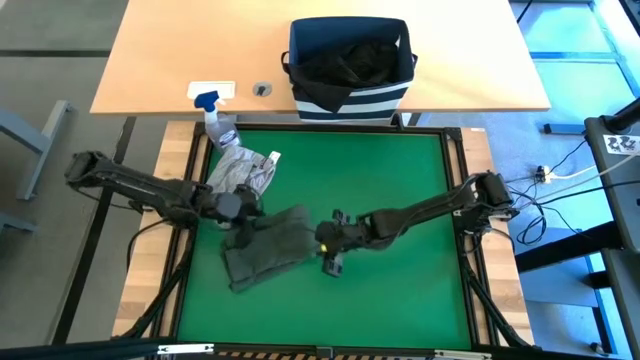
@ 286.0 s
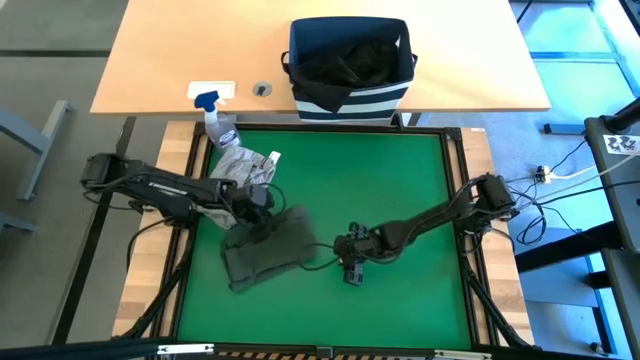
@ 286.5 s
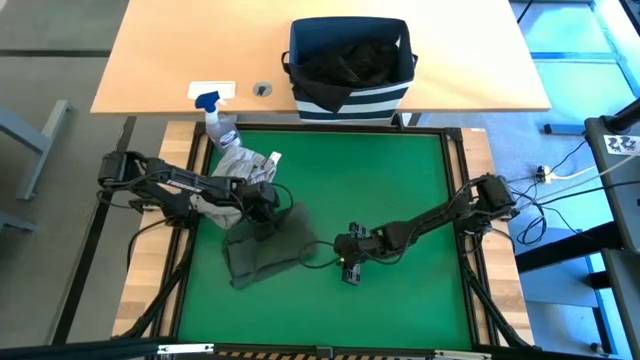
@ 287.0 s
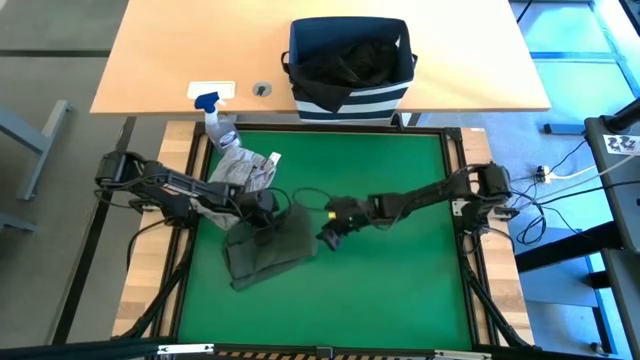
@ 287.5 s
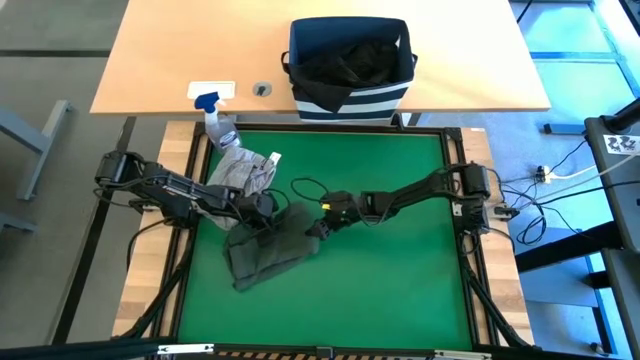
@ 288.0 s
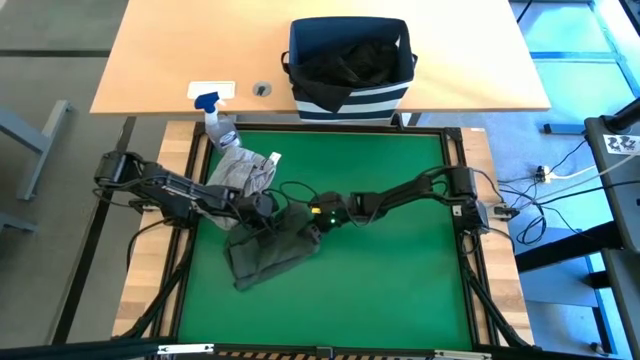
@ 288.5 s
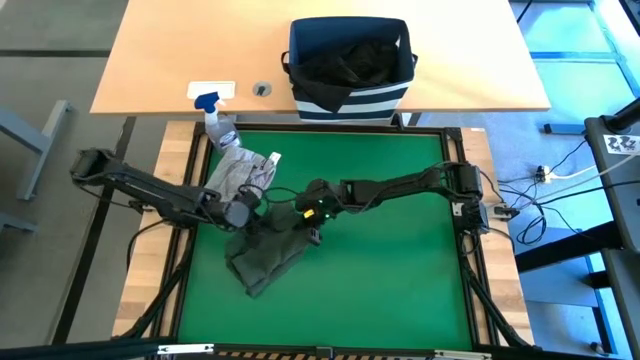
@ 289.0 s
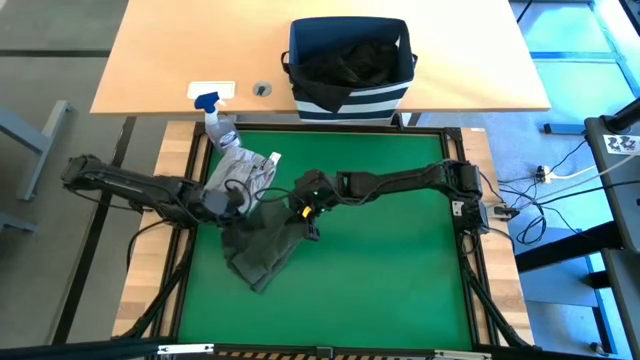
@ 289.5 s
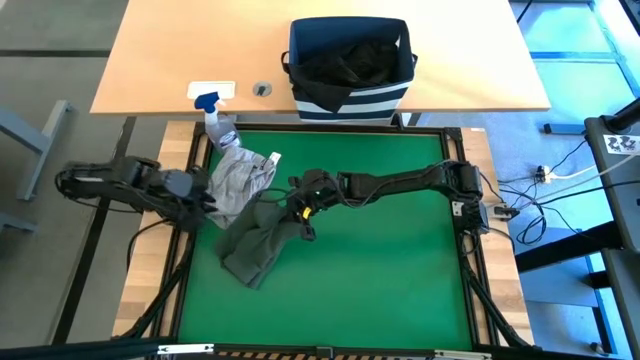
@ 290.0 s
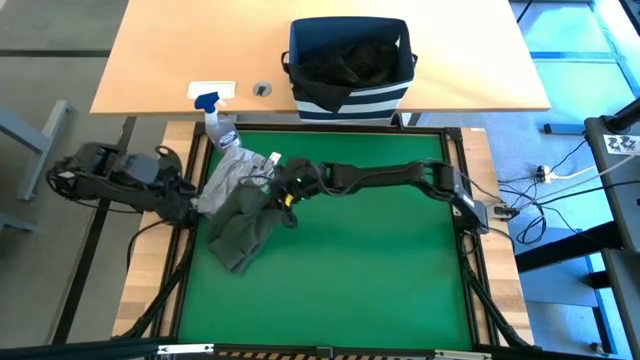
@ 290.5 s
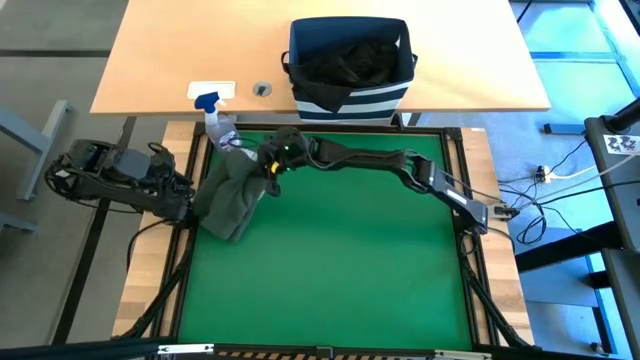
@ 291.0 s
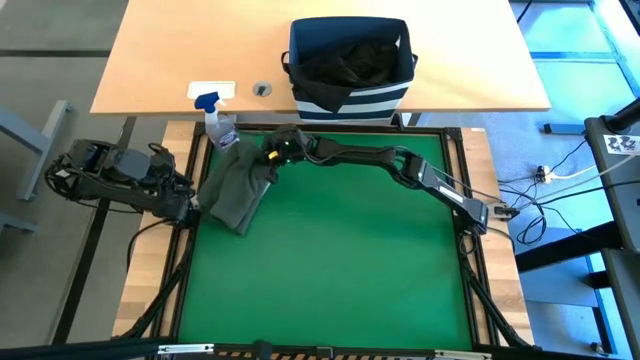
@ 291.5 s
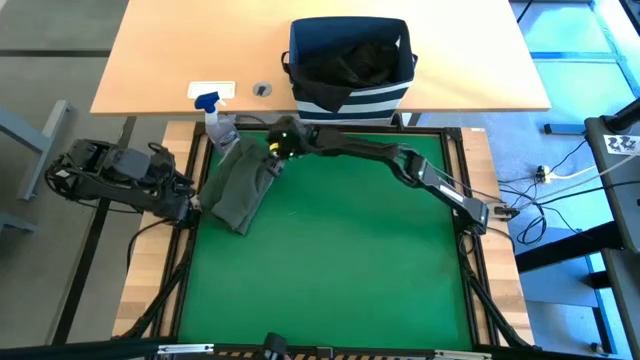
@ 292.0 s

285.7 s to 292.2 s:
Task: Fold Laundry from Bin
Stack the green shirt on top of the gray shirt on the table

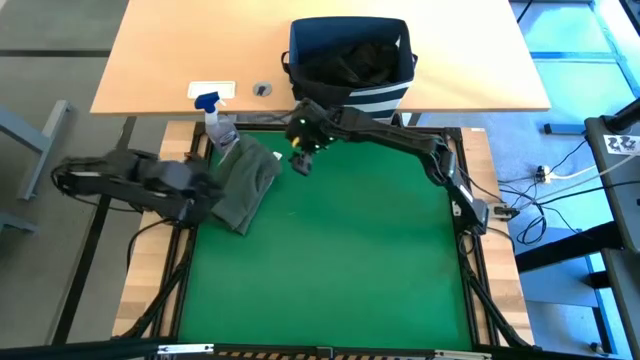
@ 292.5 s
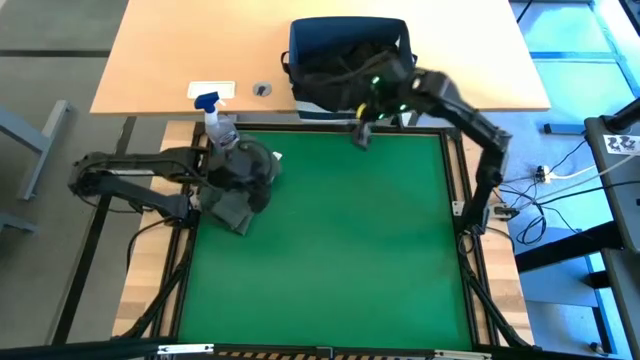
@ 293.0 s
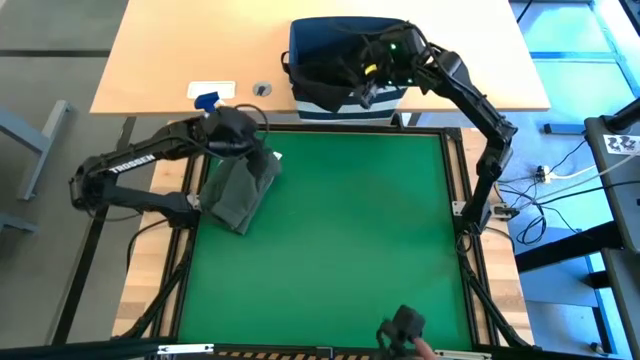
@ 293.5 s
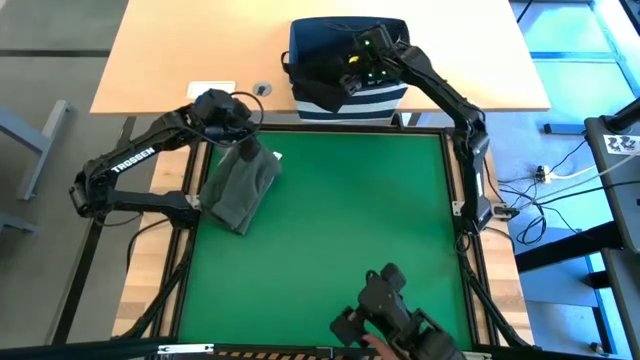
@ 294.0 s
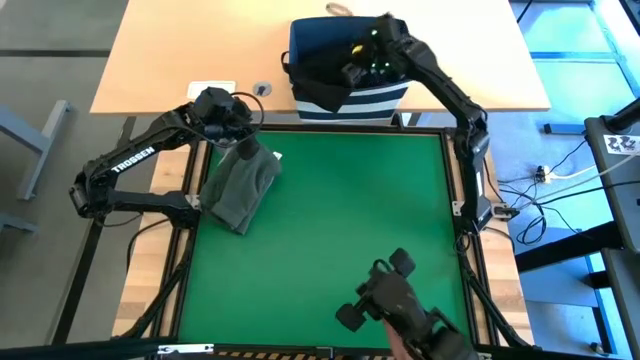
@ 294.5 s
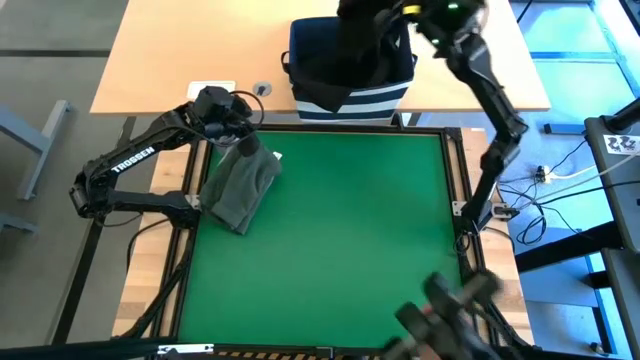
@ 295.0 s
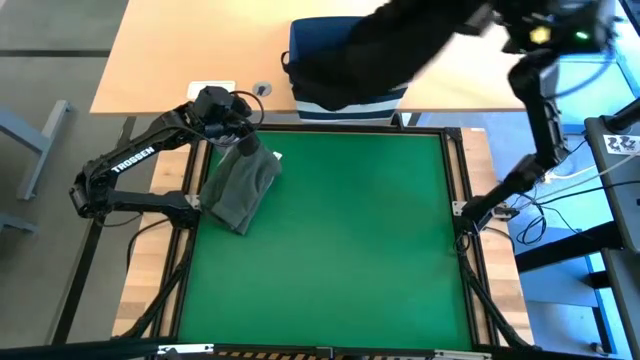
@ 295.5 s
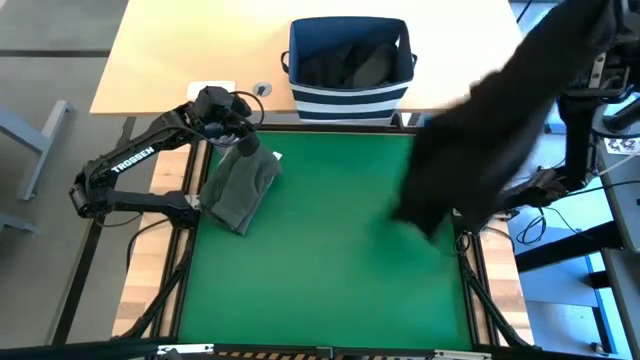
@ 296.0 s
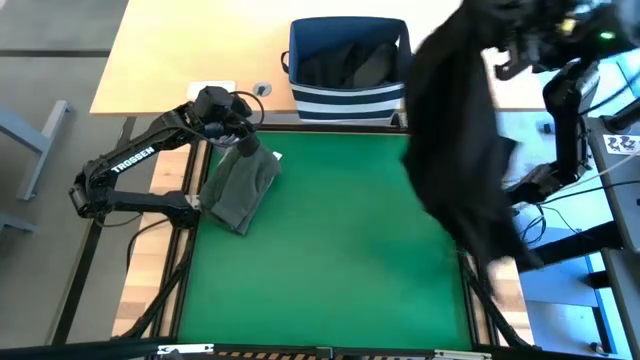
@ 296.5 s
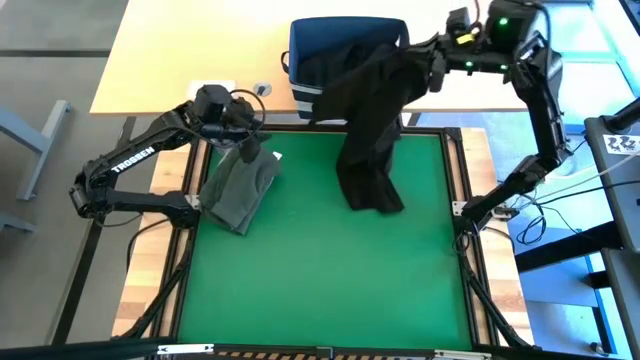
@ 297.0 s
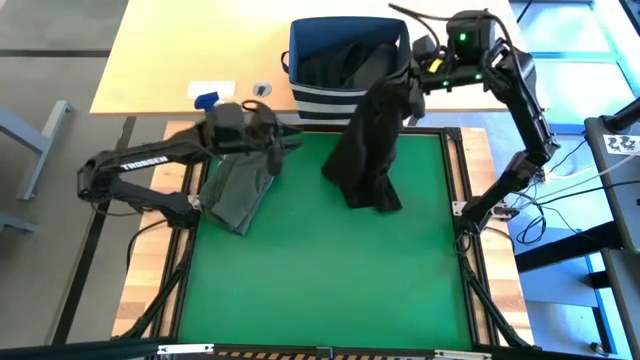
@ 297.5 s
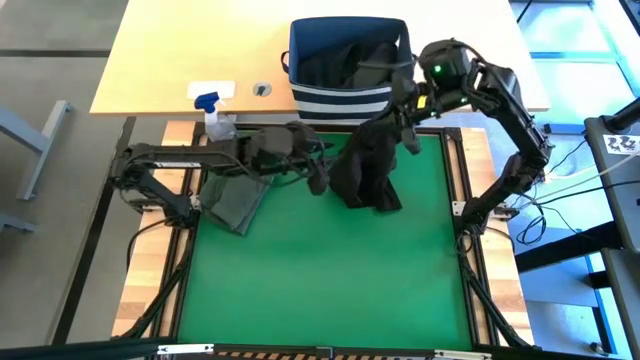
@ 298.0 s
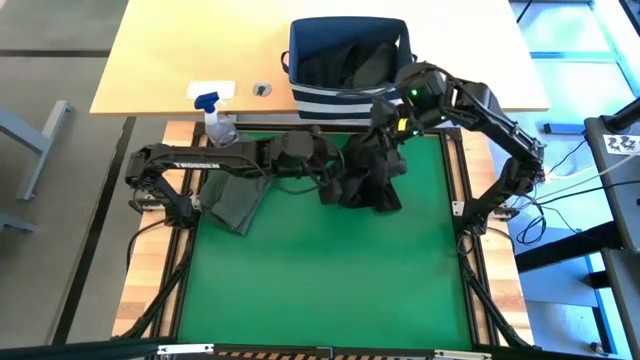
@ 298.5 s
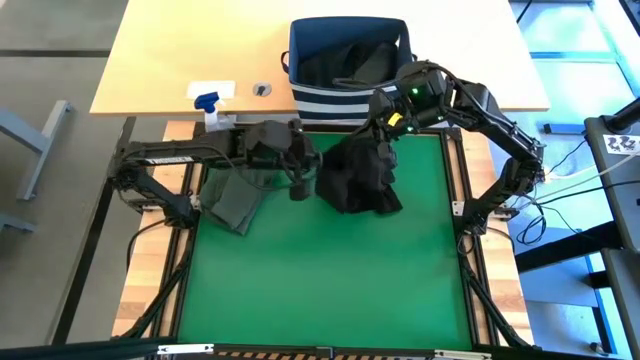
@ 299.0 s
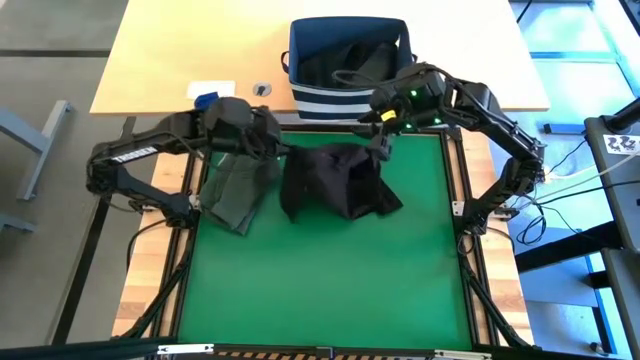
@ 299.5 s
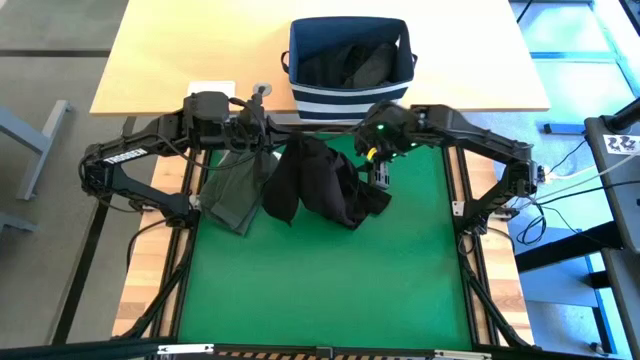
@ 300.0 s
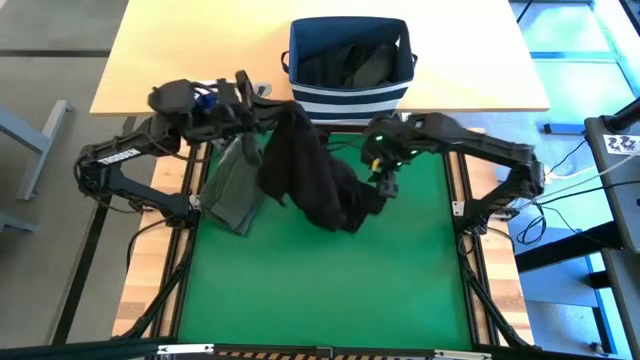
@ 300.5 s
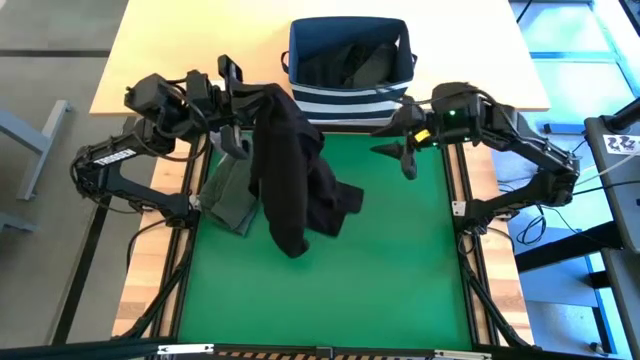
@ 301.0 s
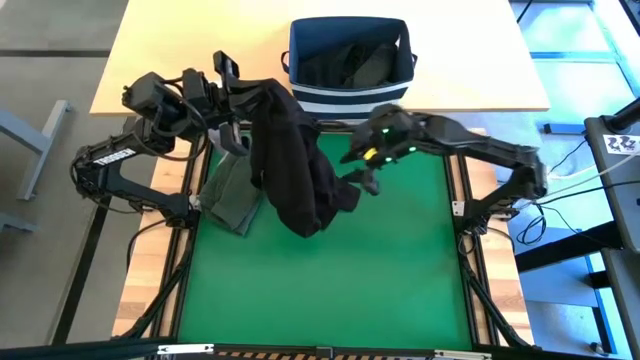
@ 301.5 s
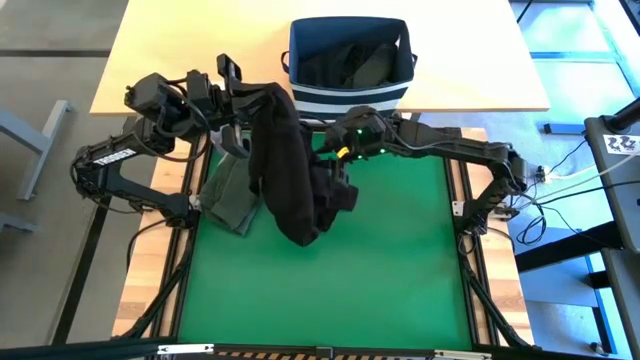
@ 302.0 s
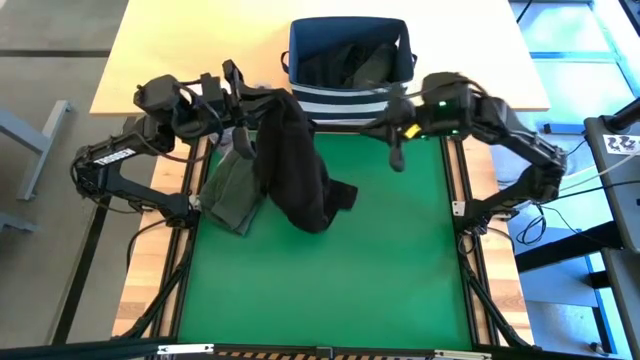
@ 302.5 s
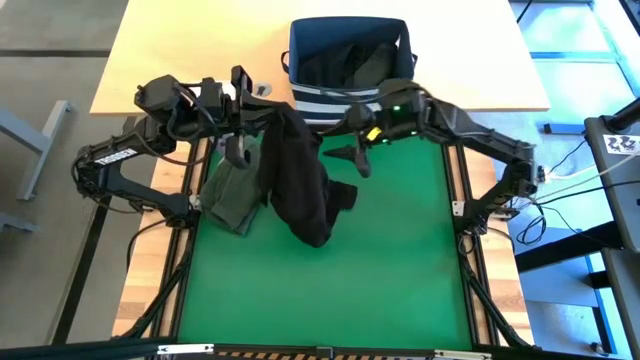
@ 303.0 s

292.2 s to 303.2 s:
Fold the black shirt

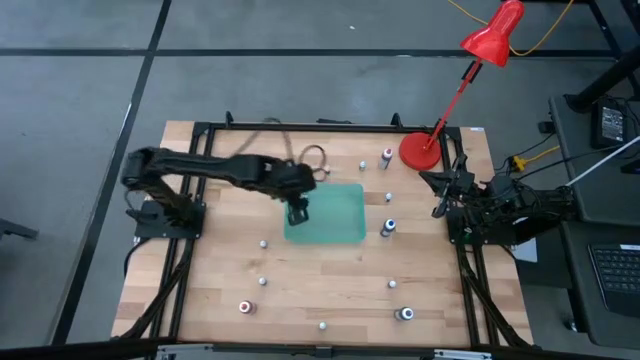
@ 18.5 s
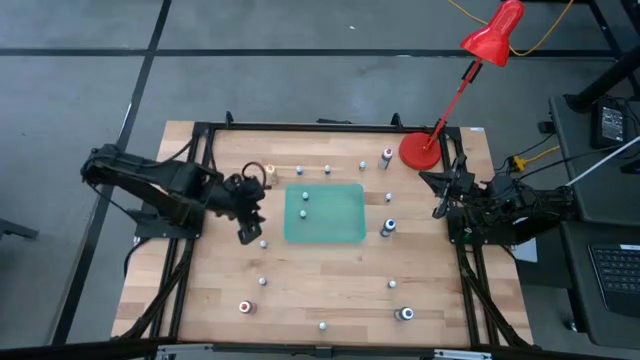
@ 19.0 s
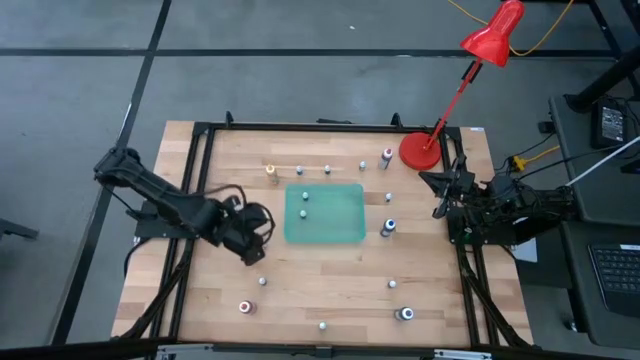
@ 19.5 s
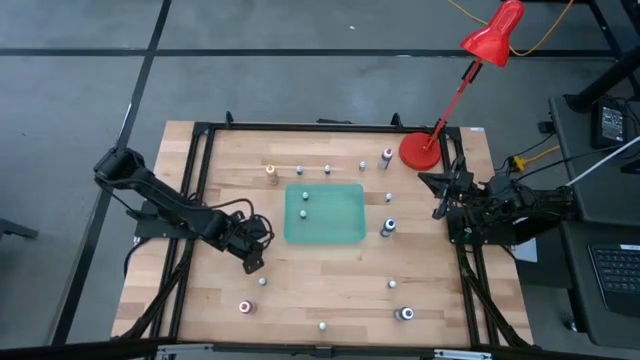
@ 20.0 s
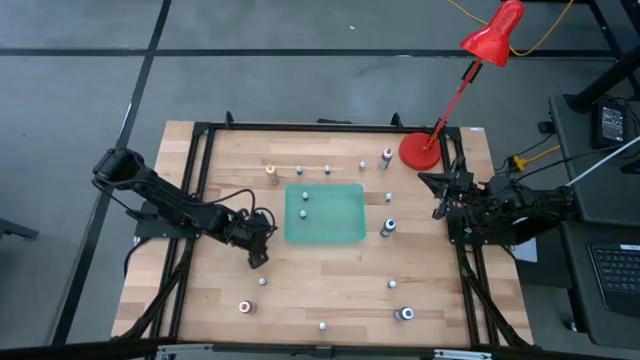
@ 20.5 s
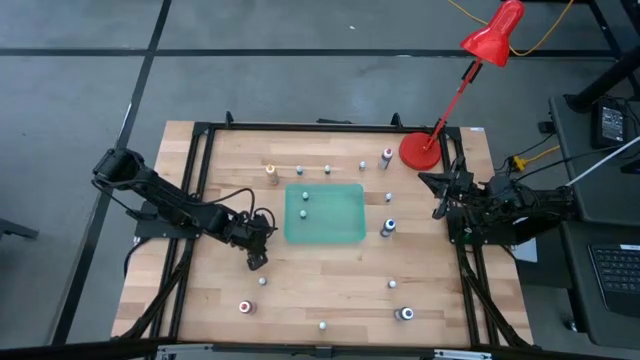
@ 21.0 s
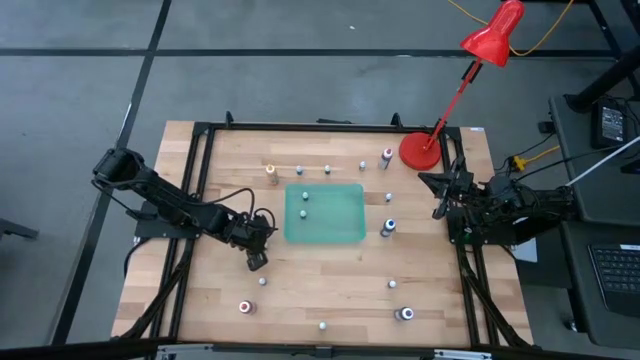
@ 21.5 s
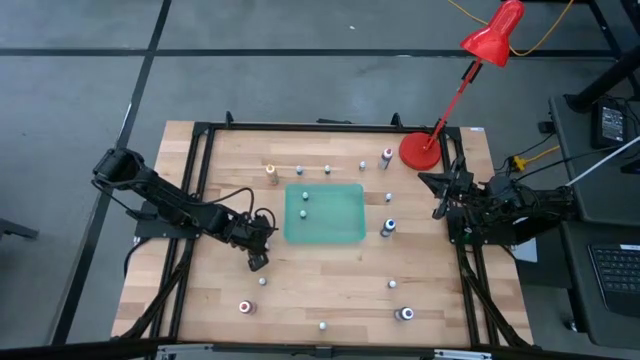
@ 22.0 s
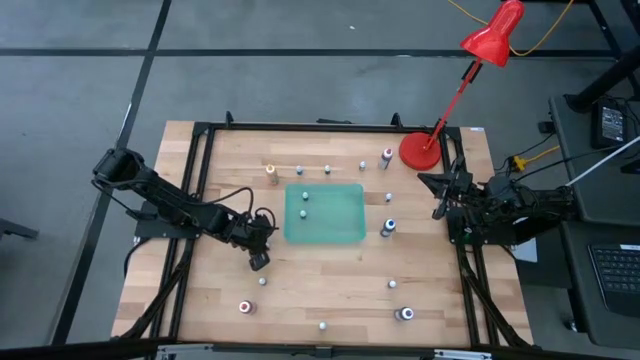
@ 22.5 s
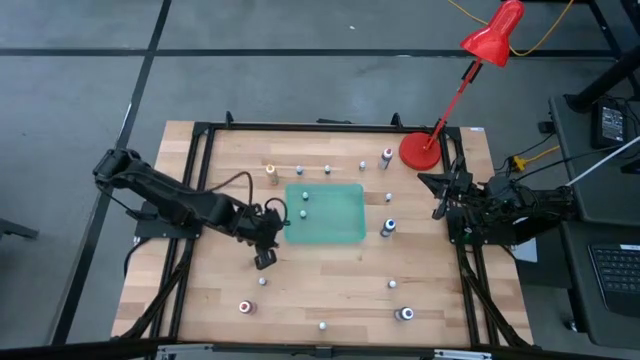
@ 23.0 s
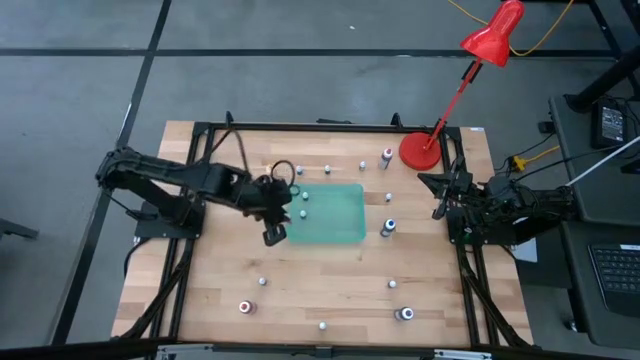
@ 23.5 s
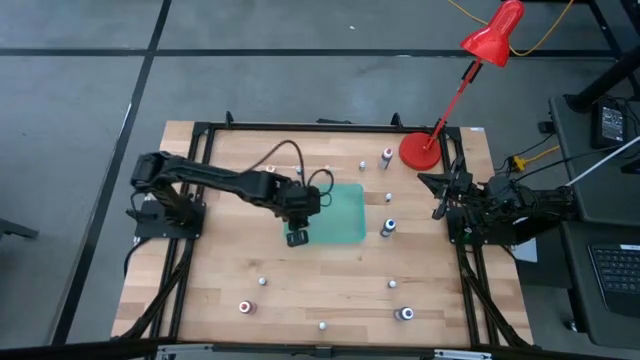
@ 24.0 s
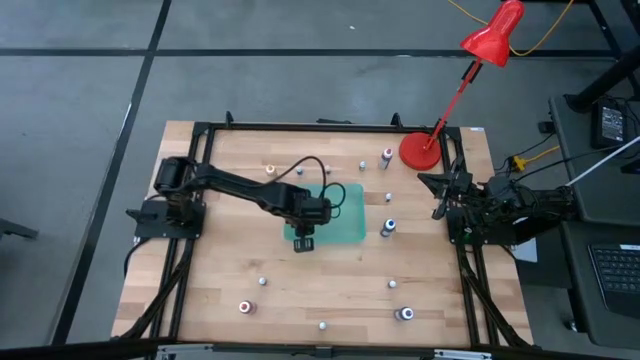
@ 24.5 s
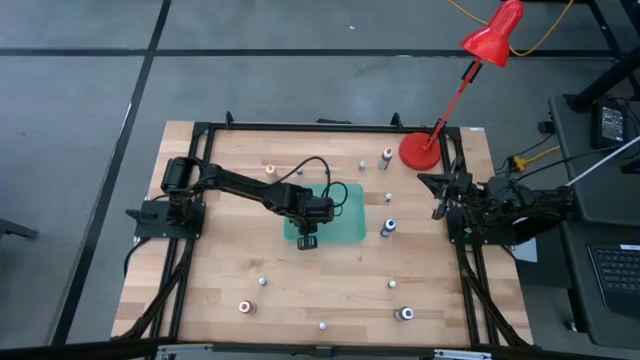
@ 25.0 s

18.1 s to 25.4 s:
Task: Pick & Place food coloring
Put the small red food coloring bottle into the green bin
